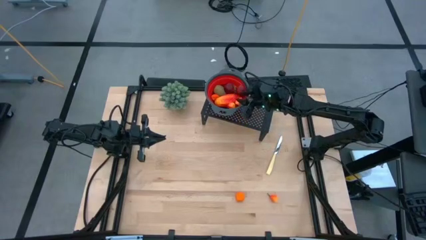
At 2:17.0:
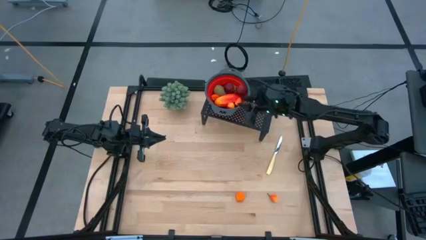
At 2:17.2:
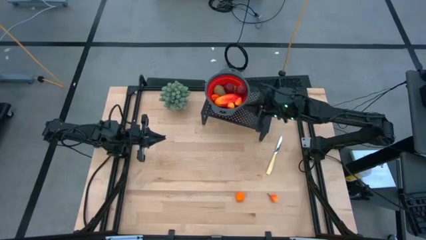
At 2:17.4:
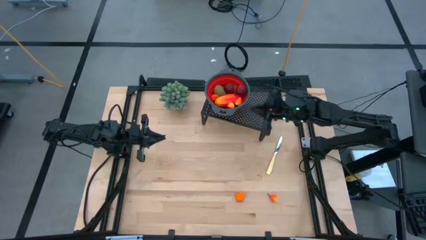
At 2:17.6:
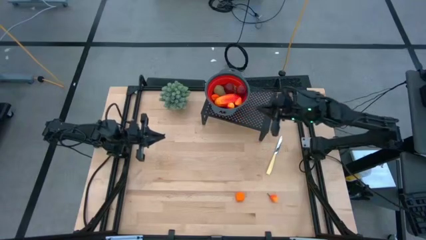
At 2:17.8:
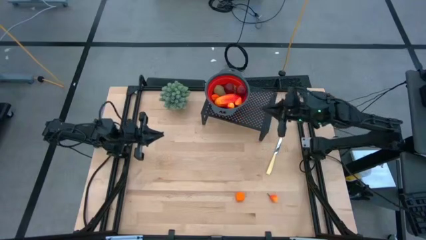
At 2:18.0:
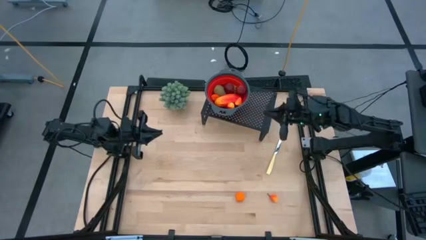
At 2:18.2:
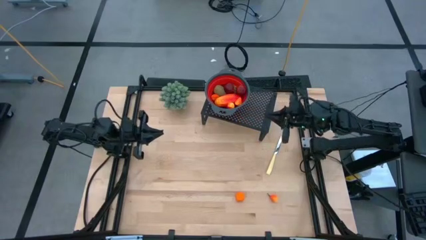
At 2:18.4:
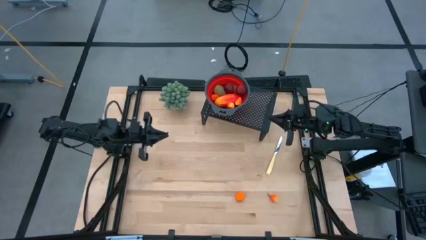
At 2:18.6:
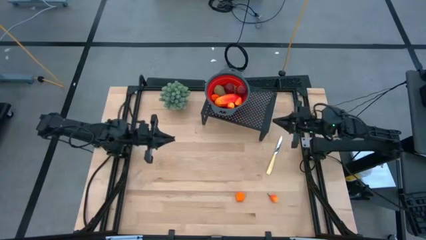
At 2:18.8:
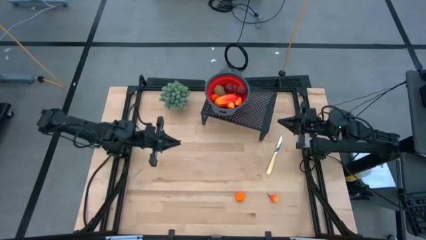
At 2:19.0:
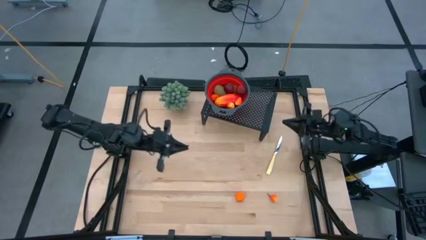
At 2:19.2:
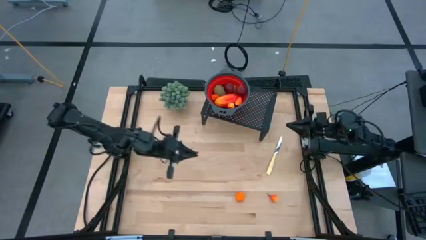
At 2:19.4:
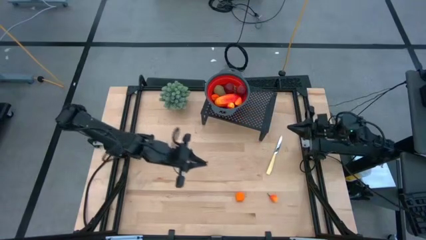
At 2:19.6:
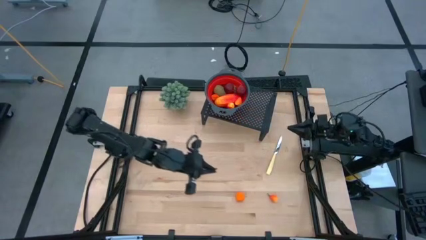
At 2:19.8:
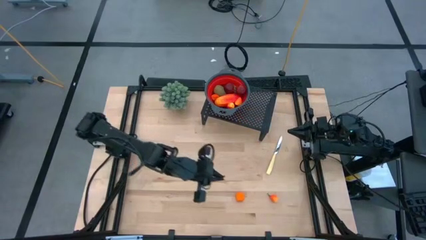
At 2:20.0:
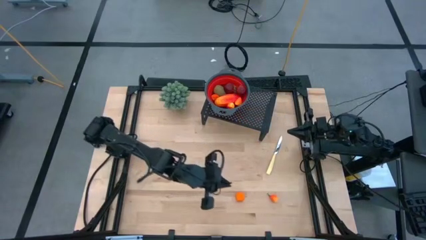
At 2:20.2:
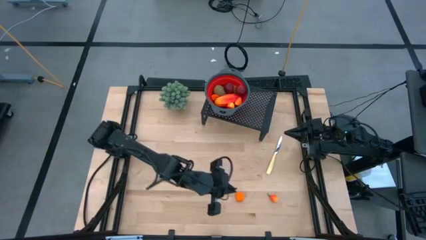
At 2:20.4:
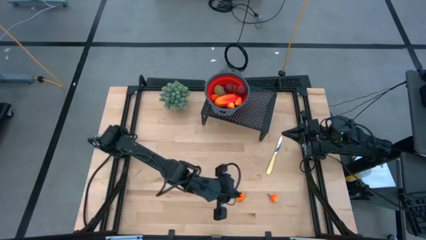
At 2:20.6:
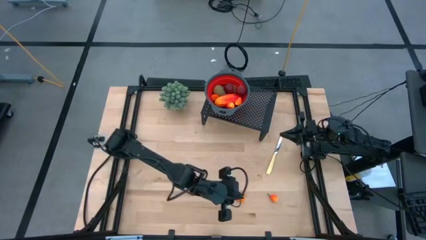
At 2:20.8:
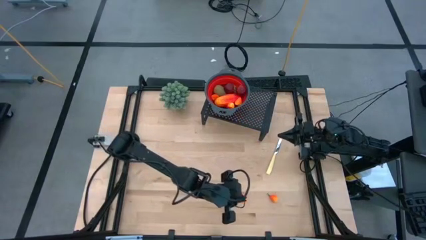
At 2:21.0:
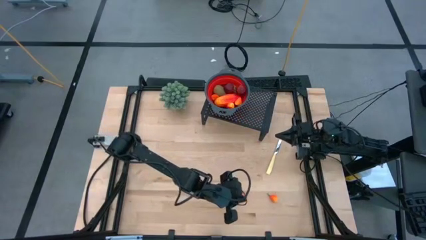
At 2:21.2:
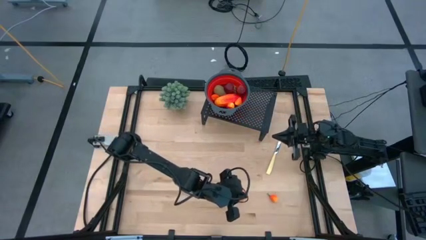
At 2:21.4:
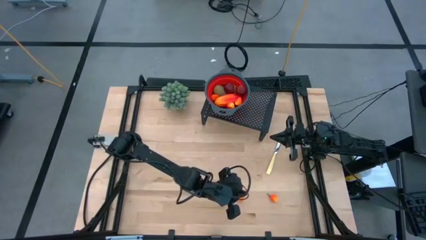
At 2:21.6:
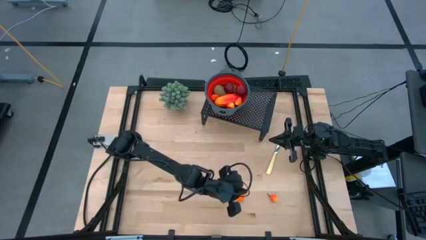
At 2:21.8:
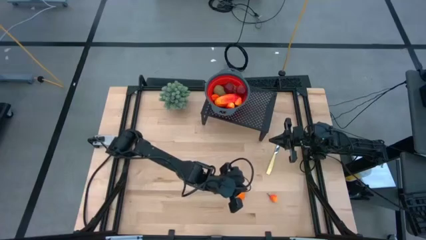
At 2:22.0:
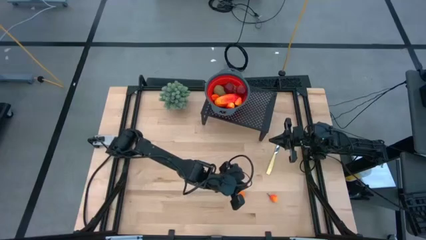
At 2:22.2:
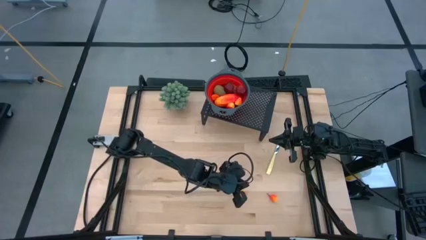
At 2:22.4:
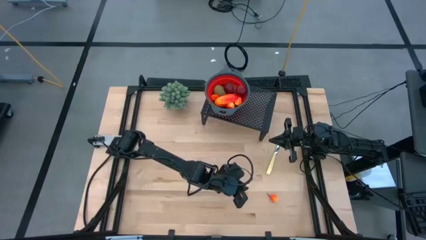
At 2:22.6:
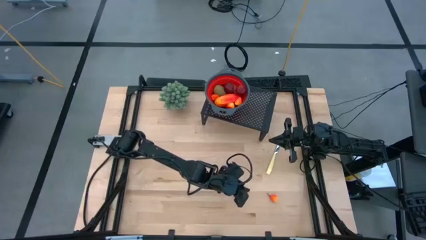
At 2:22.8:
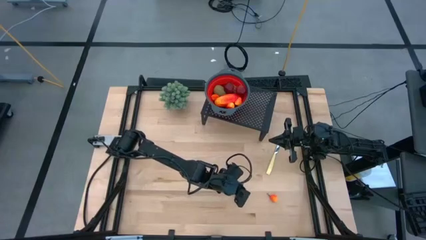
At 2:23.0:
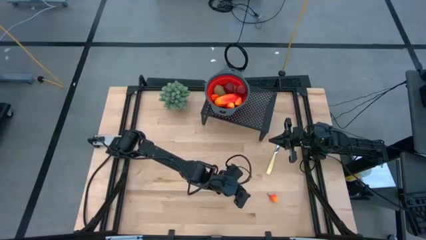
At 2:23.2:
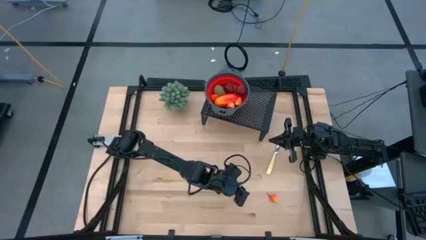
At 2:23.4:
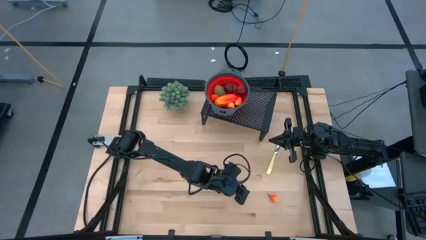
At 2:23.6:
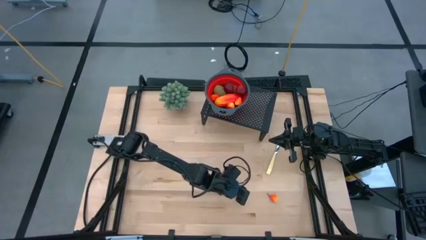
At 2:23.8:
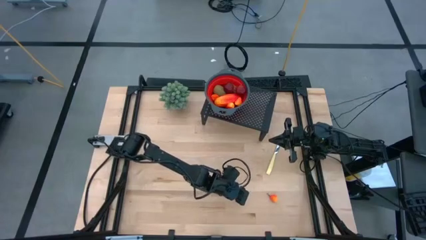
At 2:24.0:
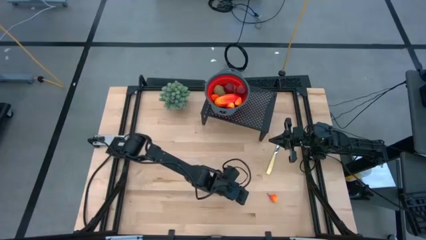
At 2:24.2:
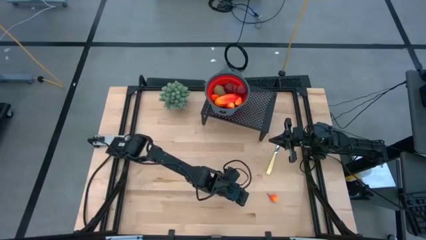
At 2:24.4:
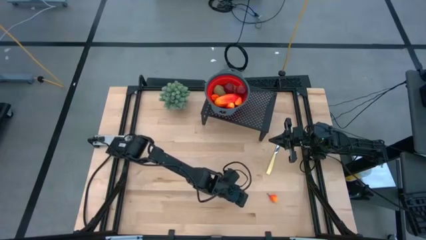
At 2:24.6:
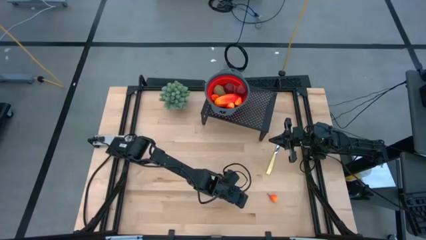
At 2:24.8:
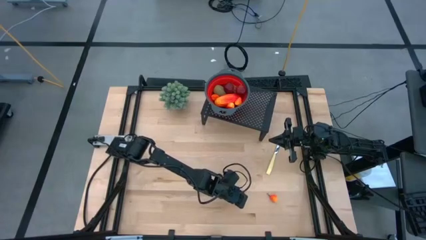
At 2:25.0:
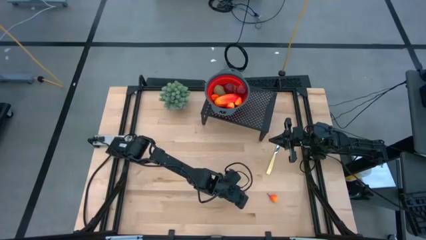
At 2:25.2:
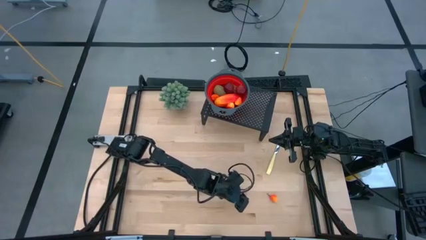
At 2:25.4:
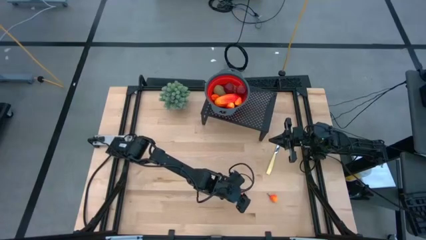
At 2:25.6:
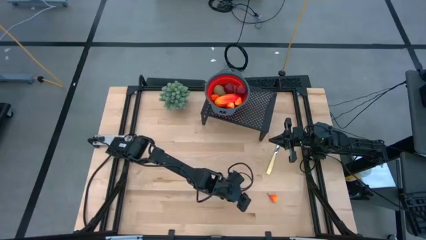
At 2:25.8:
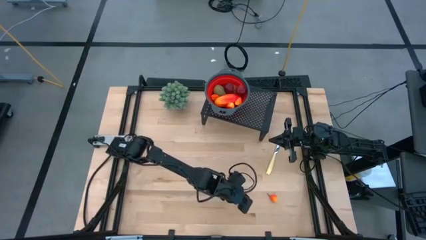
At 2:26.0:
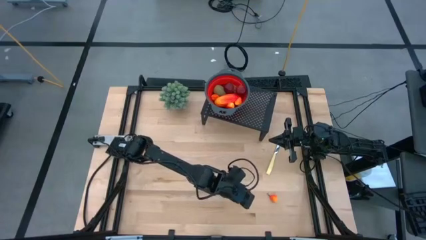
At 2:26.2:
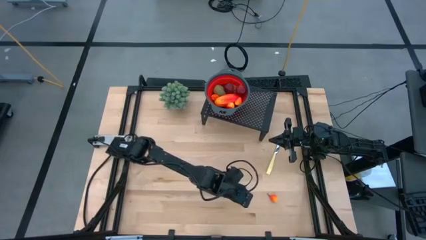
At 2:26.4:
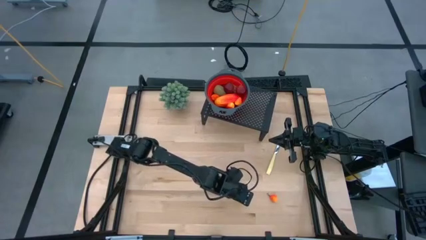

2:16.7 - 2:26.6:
Task: Pick & Place Fruit
Put the tangerine into the red strainer bowl

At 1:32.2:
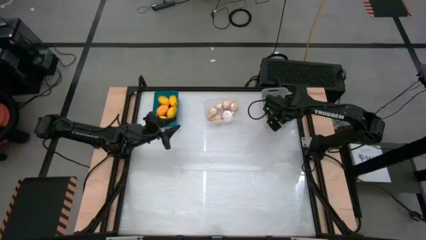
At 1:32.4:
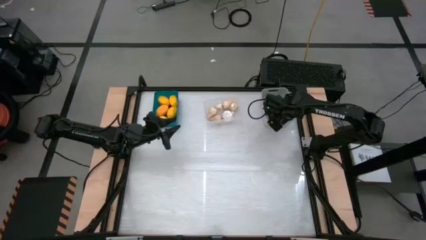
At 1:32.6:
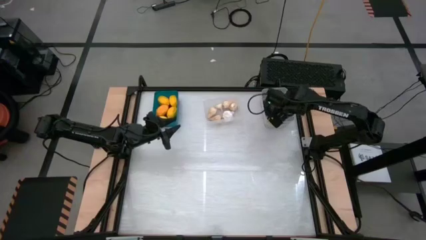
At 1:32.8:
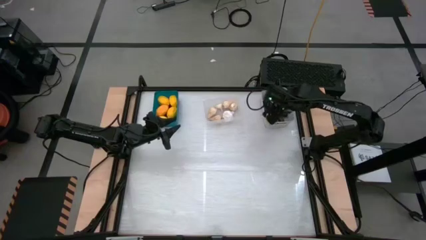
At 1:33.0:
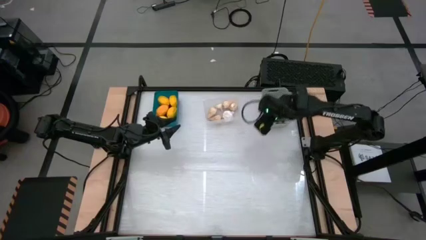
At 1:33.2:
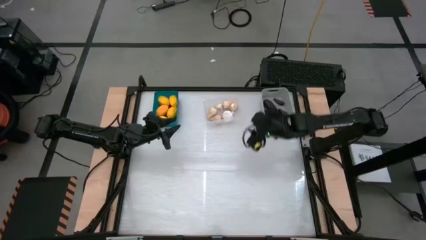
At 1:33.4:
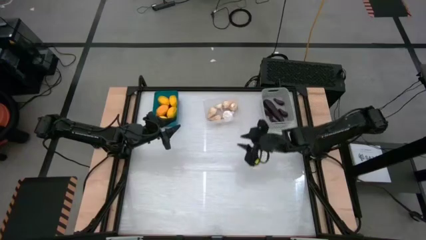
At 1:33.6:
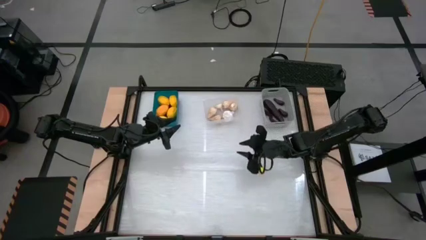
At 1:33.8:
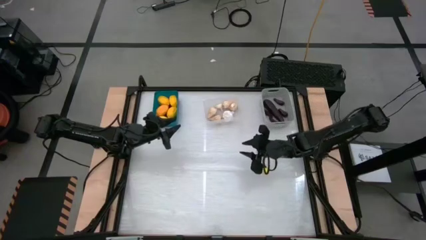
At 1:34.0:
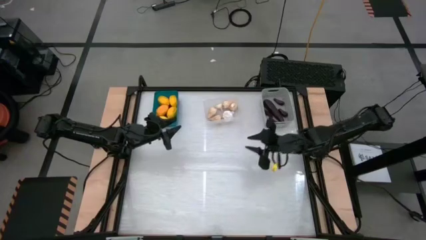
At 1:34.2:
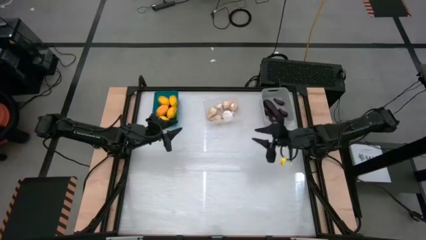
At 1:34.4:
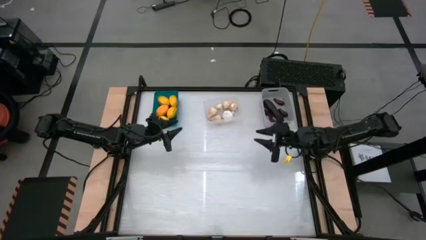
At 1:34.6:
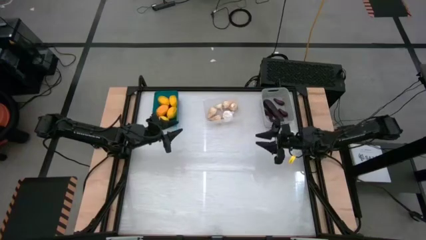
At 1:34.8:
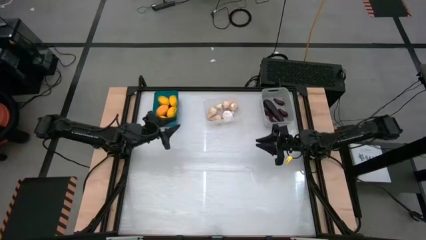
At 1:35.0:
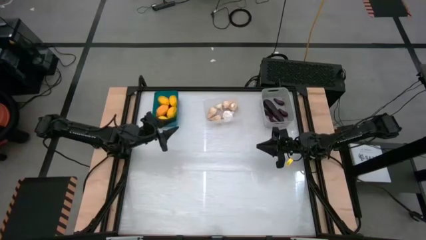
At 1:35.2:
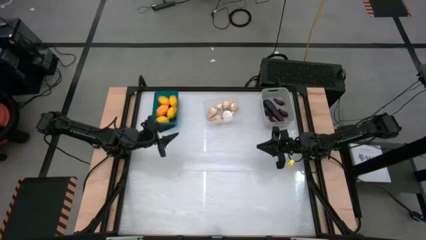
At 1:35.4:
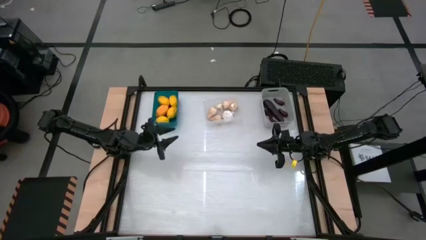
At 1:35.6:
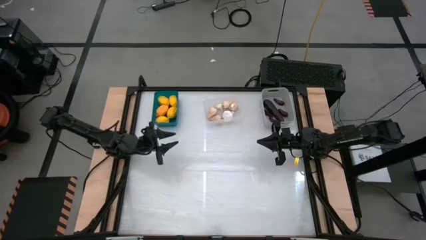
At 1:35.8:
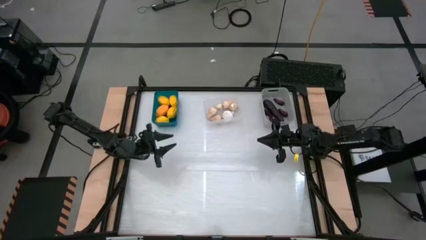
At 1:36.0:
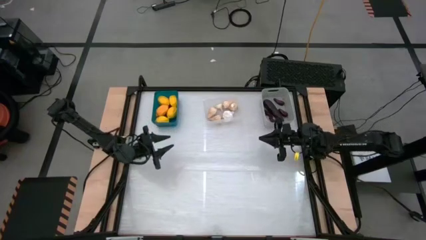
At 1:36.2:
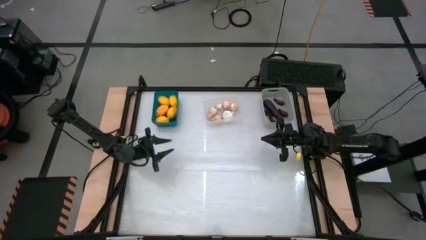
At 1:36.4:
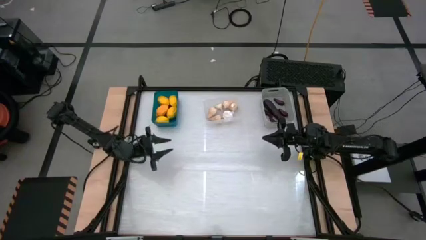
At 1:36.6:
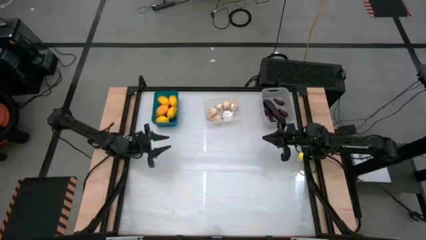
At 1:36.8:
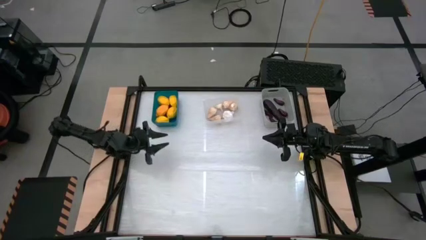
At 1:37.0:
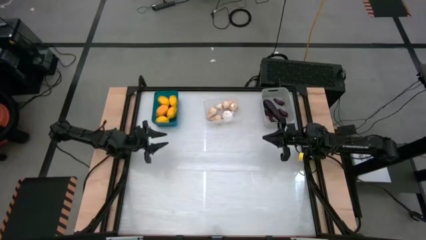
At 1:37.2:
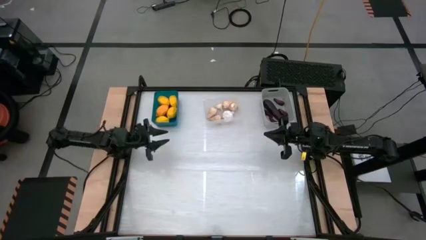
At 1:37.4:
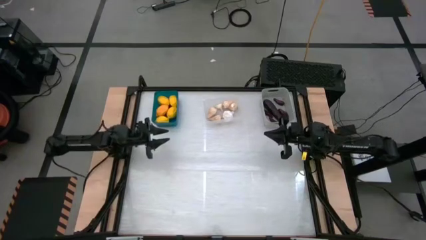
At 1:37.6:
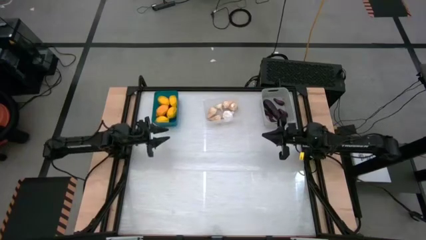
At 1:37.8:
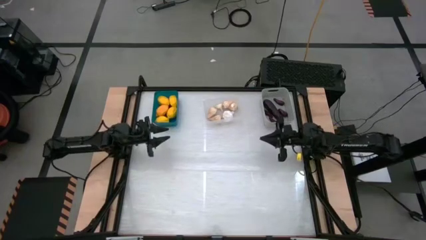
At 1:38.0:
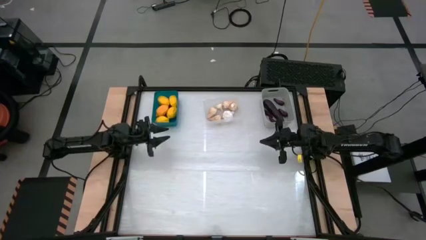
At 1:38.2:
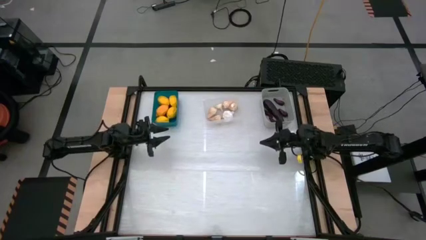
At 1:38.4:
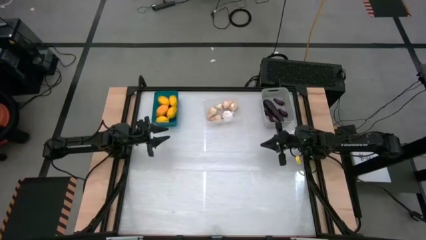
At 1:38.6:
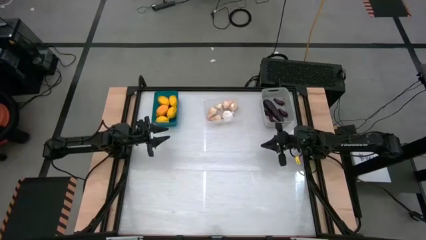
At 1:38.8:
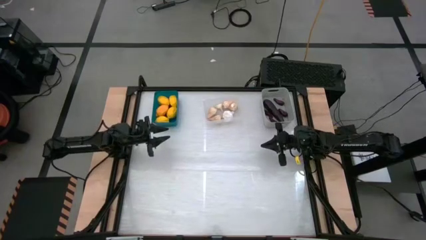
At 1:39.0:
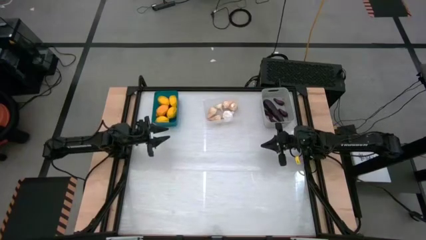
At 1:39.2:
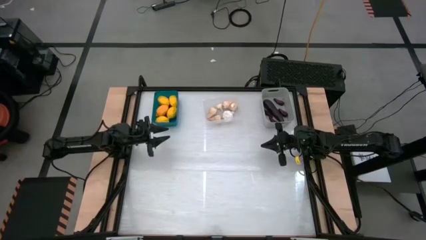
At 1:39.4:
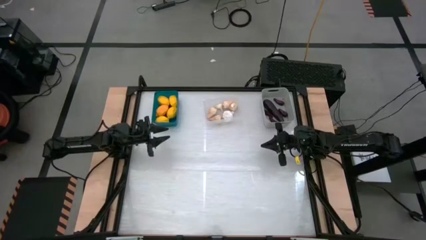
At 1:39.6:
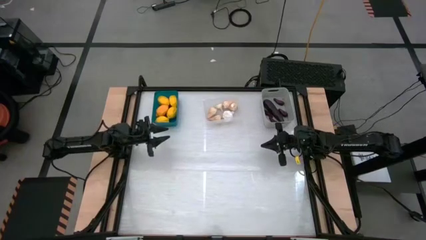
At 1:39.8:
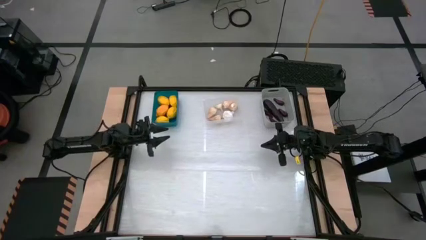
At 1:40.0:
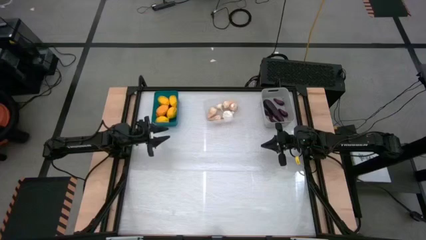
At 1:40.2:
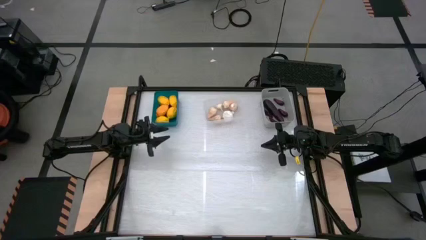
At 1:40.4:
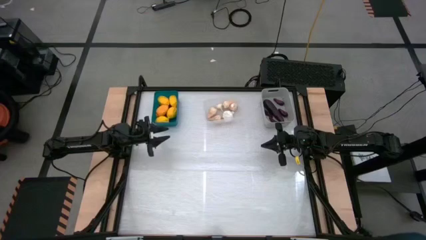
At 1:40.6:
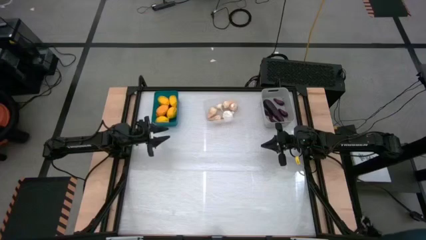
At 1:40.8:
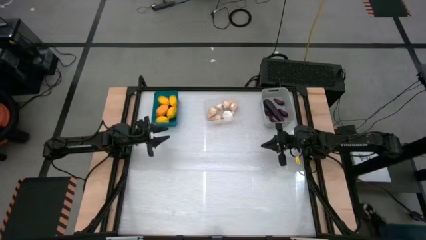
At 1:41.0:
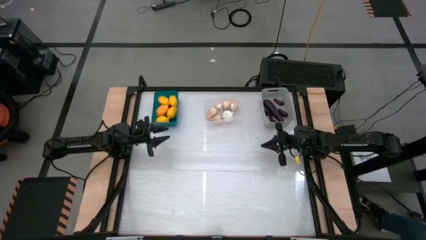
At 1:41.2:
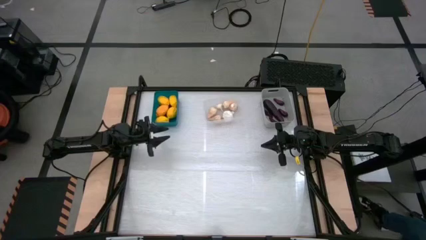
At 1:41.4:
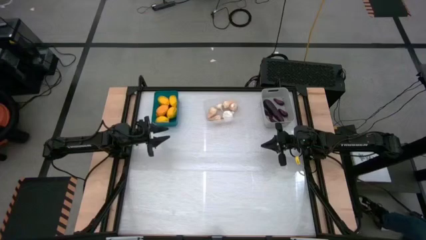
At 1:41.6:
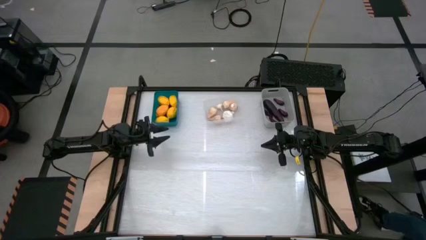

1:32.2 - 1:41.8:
Task: Sort produce into baskets
Return to Home Position
